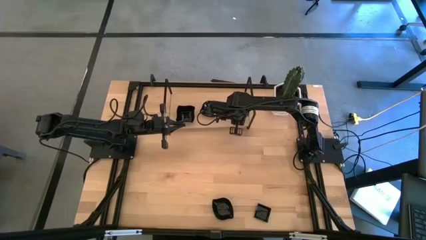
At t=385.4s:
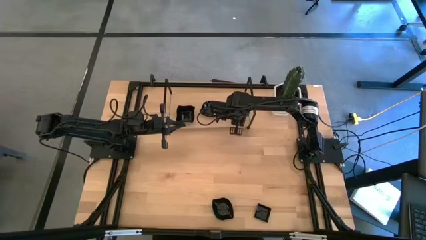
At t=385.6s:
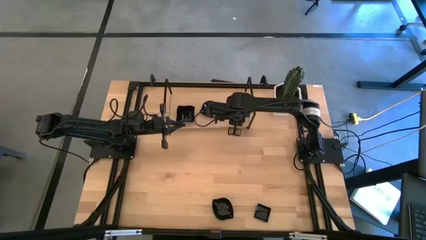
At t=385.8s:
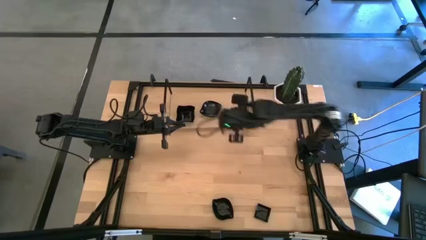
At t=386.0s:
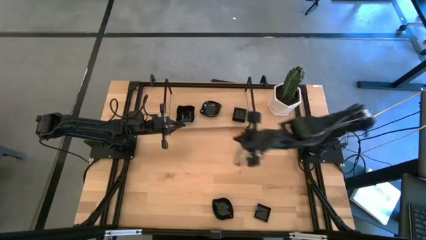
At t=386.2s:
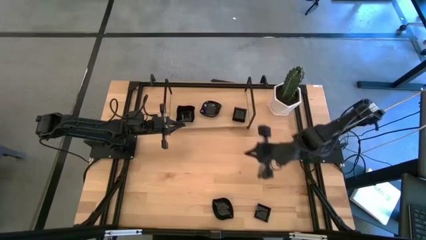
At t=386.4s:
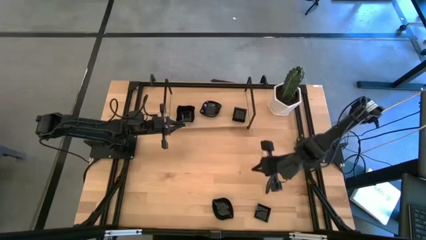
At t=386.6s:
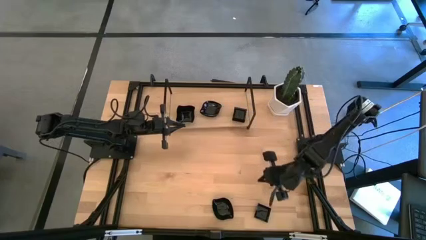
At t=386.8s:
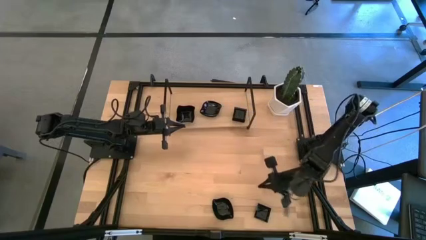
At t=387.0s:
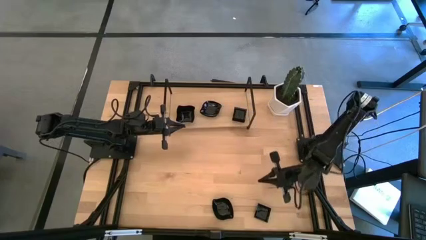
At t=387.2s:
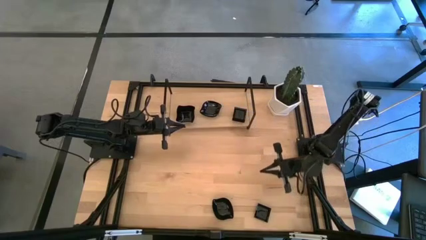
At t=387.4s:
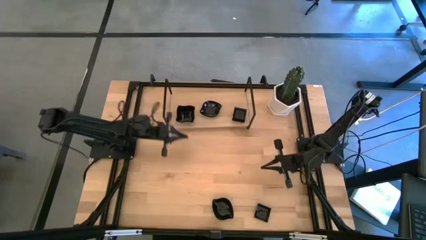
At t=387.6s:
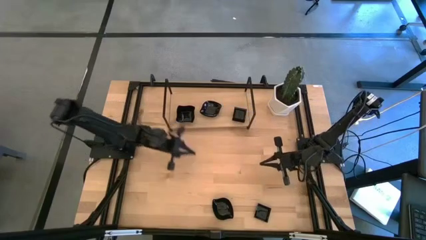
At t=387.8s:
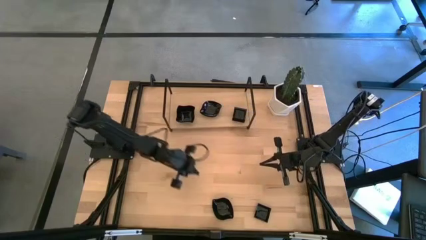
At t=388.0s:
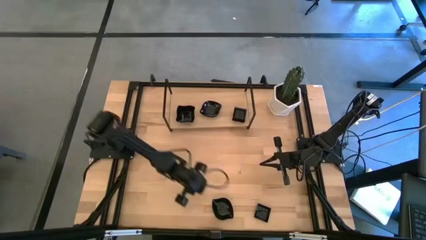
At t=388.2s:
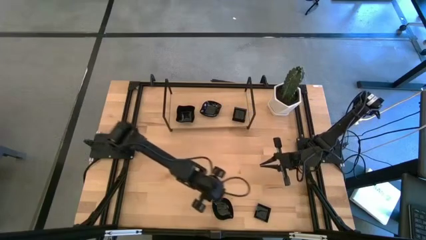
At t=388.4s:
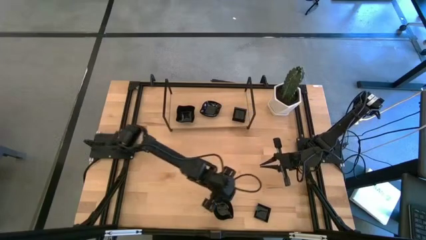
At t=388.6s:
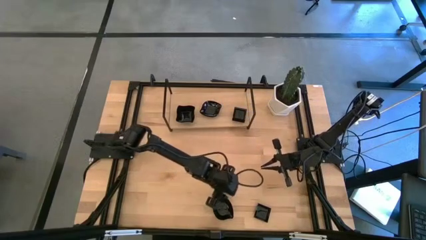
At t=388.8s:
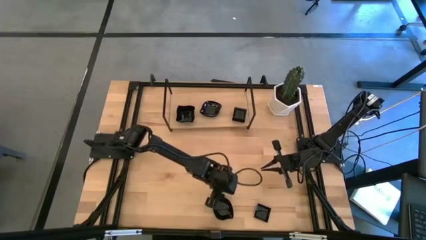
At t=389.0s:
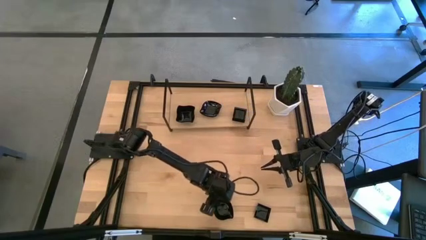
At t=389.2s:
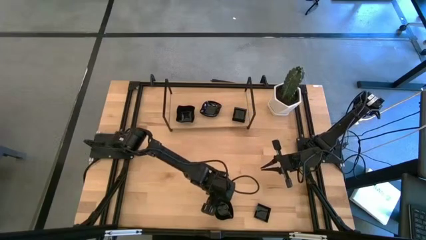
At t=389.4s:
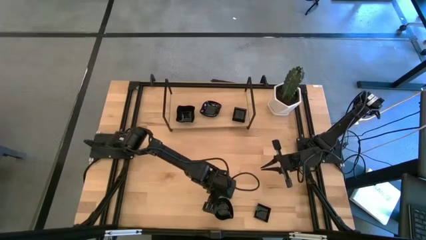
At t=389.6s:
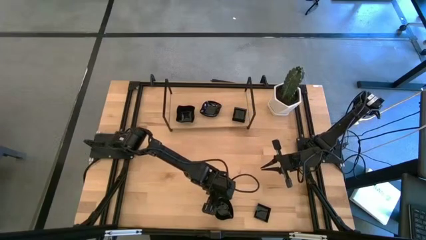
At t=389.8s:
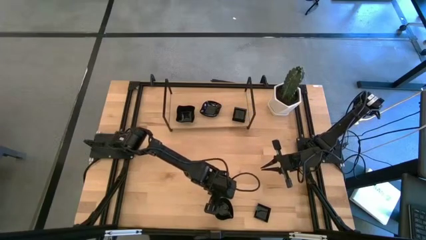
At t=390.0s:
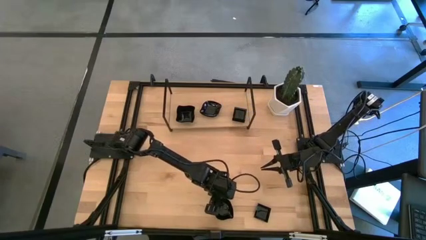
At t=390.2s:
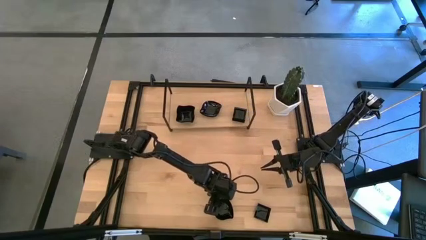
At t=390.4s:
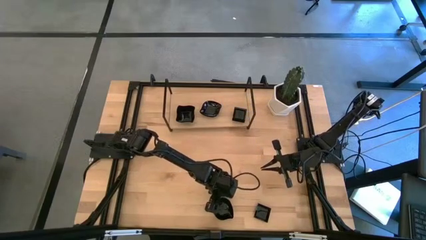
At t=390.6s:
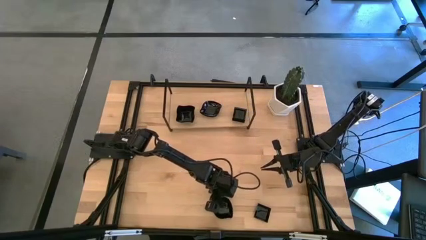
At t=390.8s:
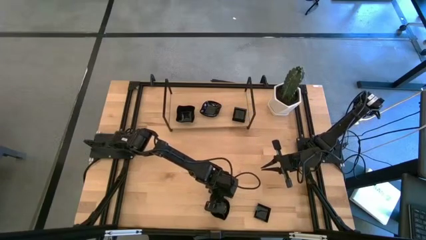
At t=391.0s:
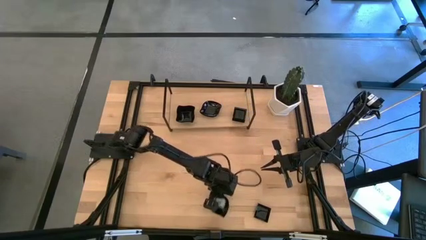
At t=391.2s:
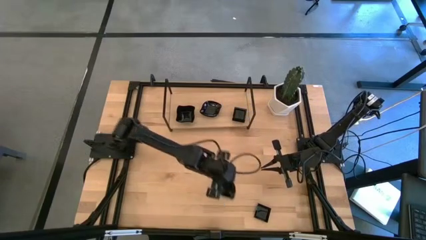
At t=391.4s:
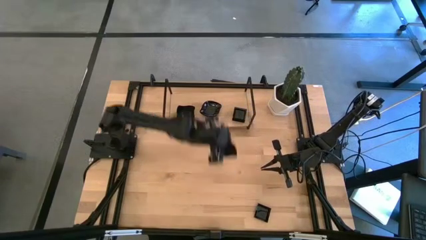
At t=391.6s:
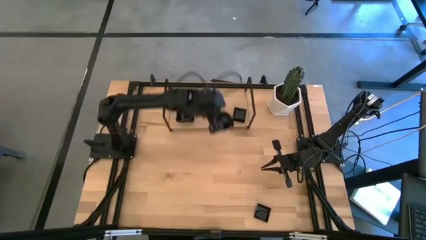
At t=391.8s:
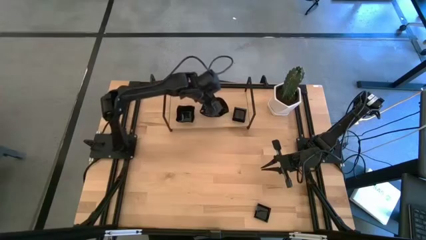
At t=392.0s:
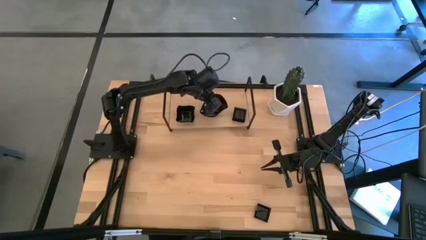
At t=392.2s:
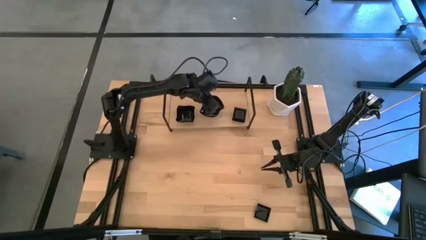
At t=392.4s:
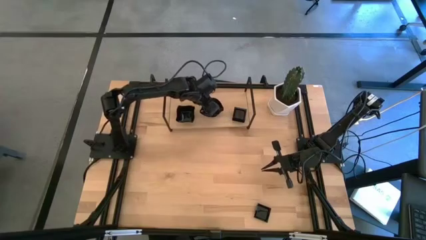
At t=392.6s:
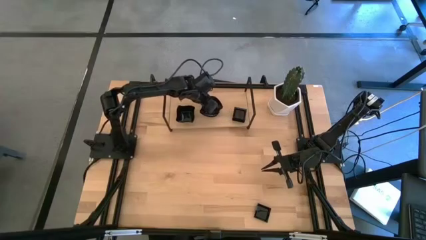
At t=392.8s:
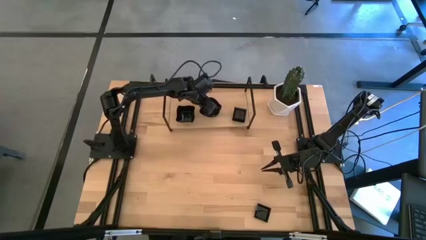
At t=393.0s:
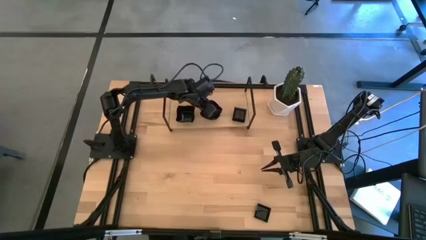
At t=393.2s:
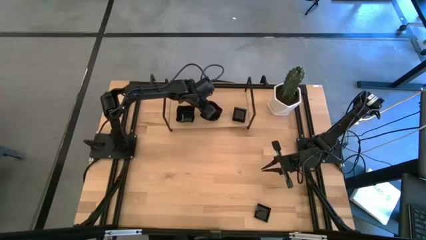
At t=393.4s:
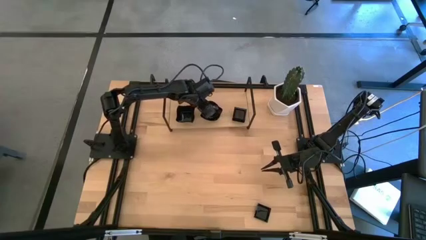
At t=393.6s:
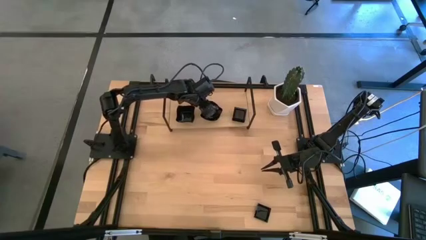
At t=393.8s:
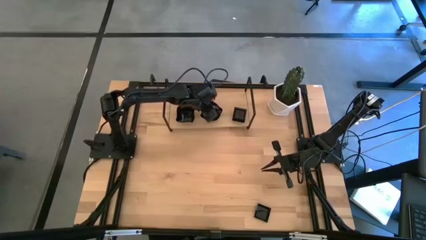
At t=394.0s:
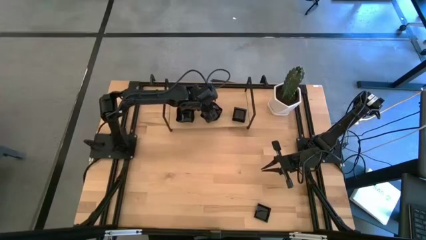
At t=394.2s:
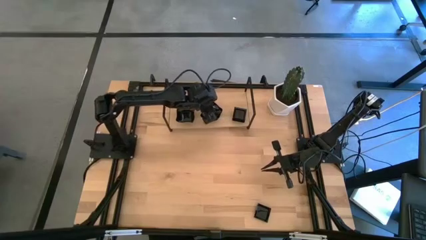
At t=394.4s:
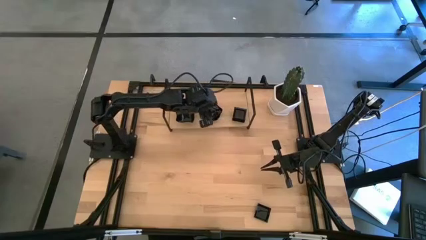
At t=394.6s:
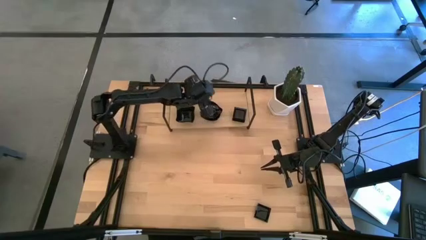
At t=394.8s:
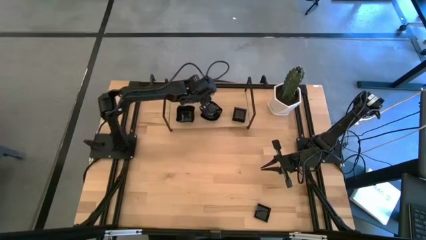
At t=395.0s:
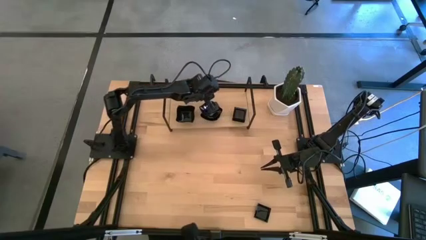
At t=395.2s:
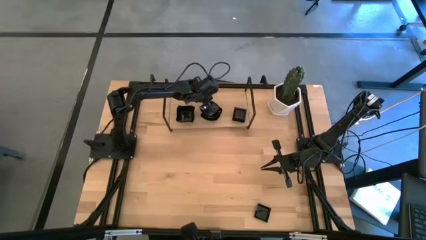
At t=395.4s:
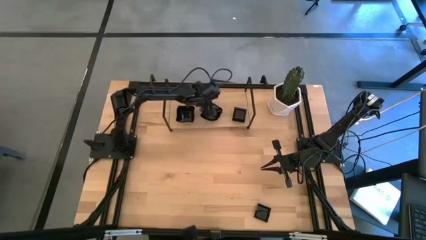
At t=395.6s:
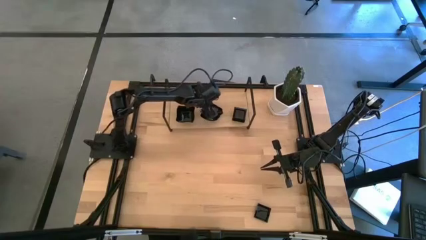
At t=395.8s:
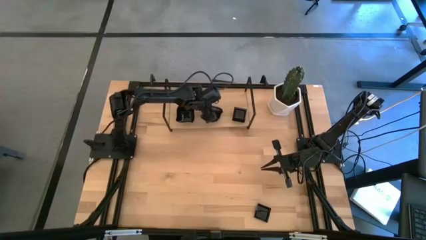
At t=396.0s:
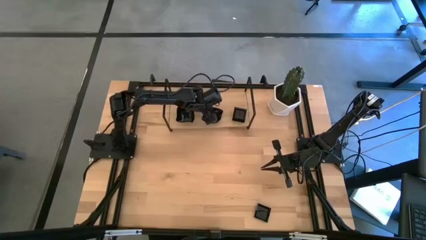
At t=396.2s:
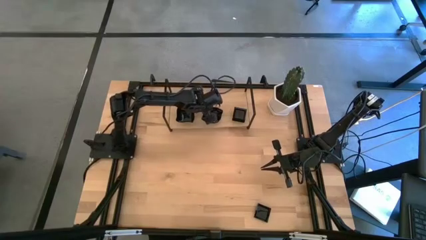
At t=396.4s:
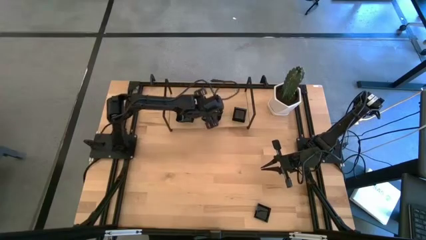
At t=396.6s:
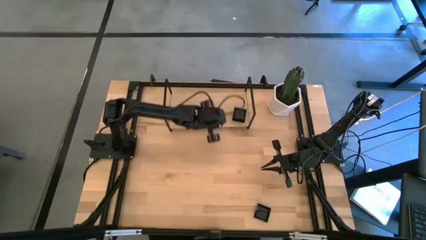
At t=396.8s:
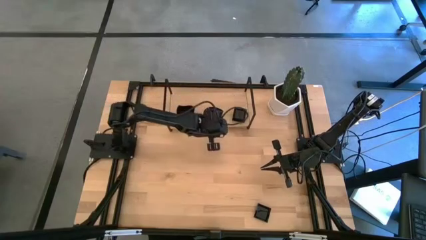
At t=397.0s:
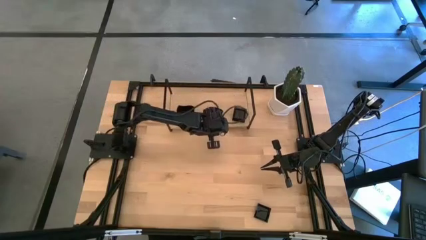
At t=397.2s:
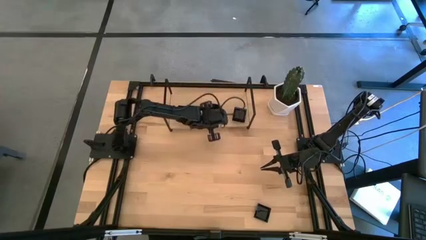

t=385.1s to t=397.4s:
Task: Pick & Place Mini shaped plates
Stack the leaf-shaped plate on the top of the leaf-shaped plate on the shelf

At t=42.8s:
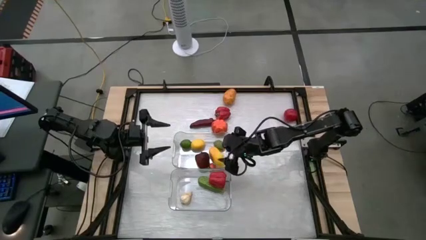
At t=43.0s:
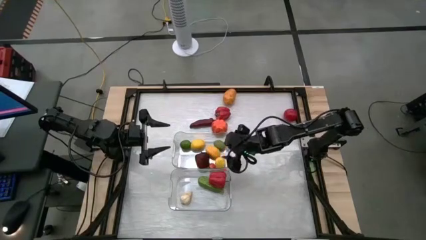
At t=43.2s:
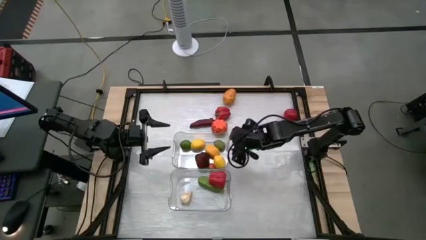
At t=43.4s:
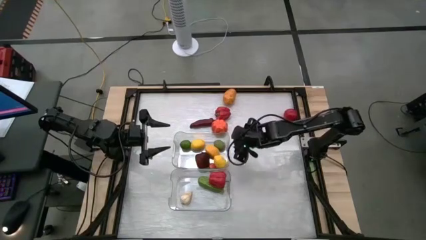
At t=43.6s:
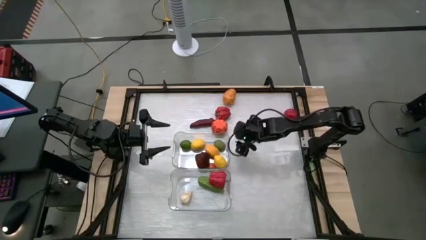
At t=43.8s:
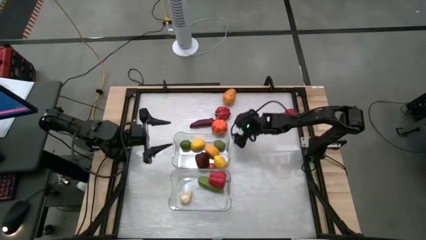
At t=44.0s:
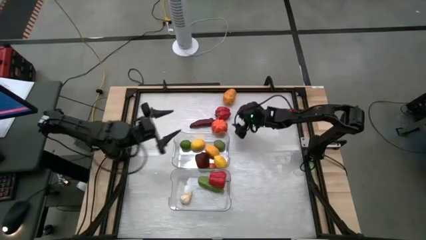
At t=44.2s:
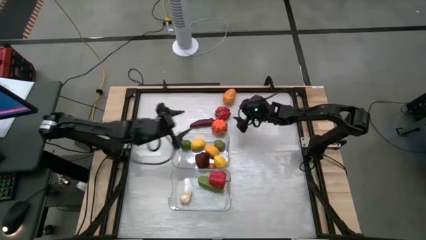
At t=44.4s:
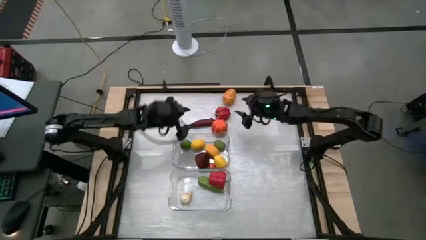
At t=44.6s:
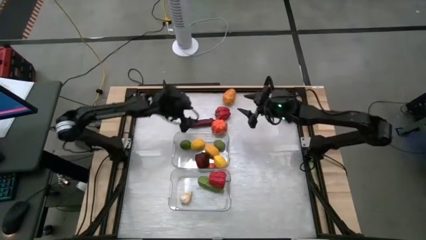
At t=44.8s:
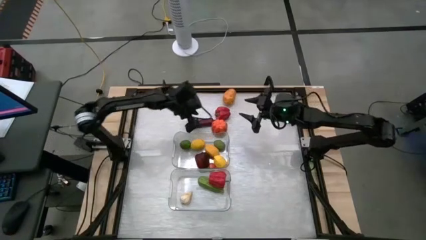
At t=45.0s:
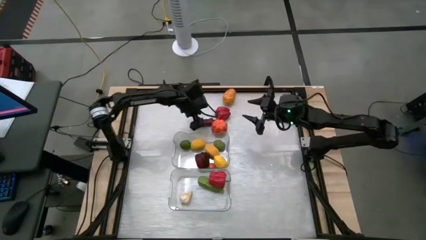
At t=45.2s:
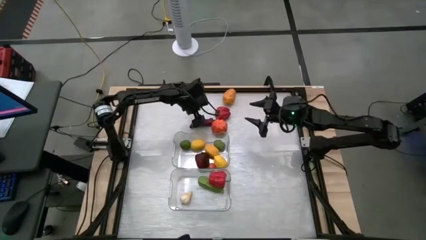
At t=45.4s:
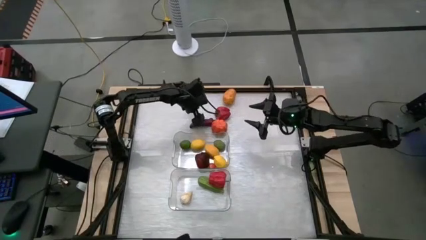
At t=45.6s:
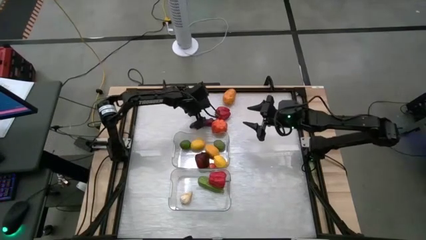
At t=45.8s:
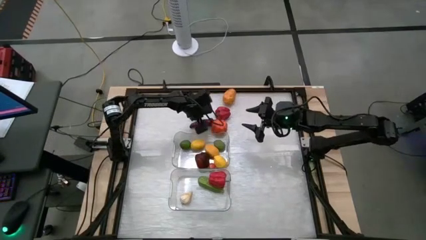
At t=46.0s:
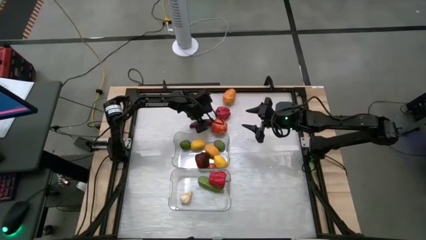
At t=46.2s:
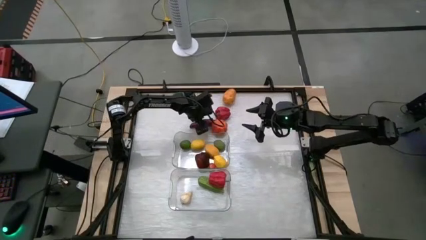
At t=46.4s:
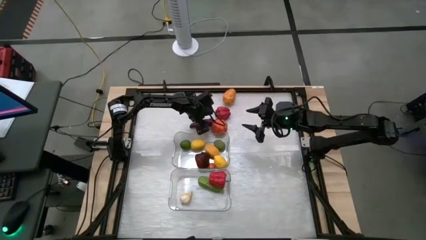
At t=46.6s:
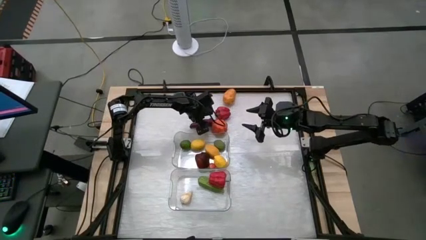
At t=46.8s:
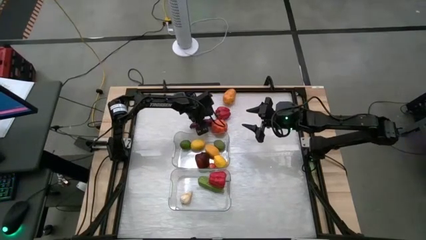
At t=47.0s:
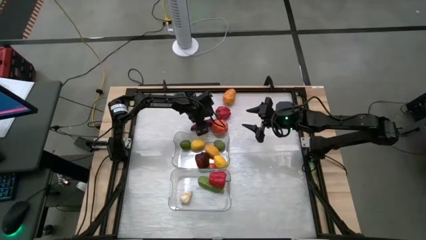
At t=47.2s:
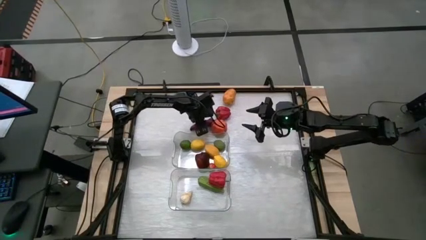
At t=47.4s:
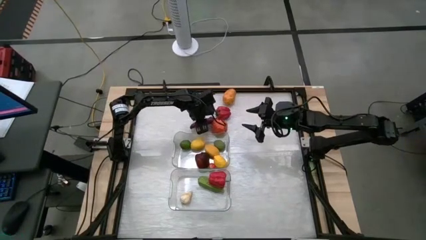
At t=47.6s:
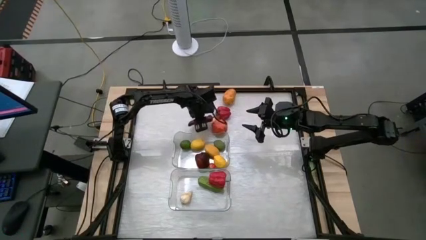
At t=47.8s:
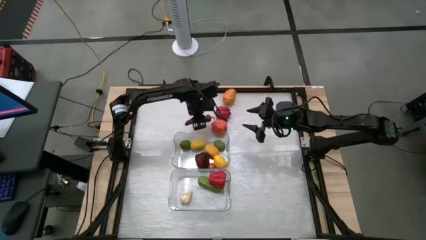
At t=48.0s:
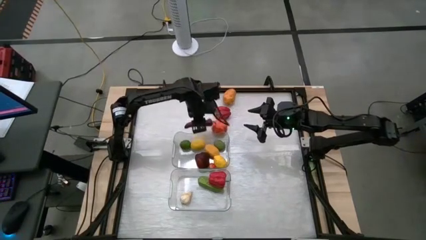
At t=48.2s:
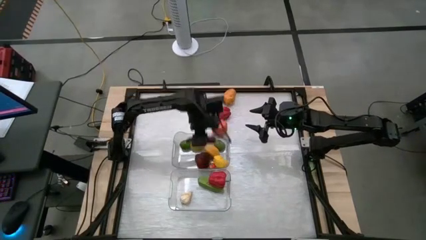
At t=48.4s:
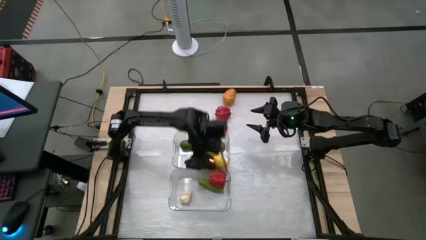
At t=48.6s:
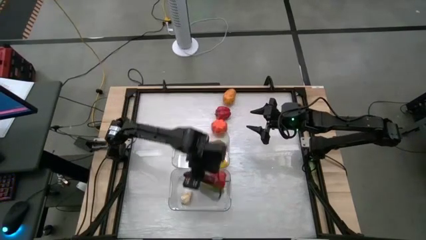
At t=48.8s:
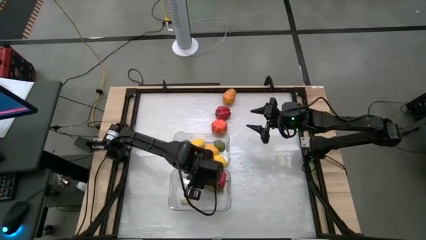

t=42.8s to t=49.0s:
Task: Sort produce into baskets
Put the red chilli pepper into the bottom transparent bin
